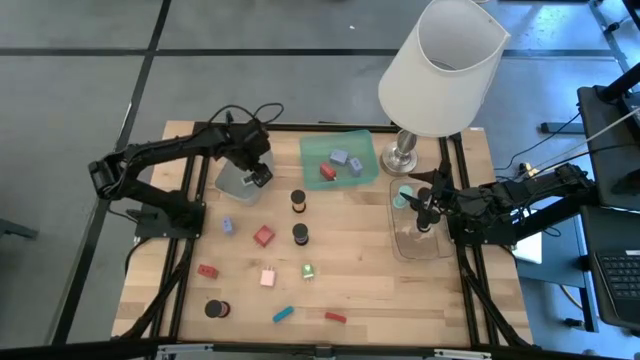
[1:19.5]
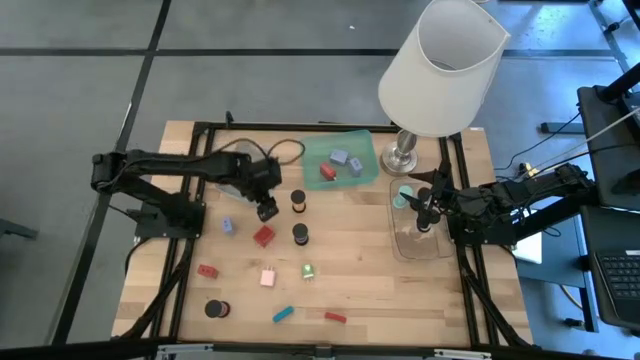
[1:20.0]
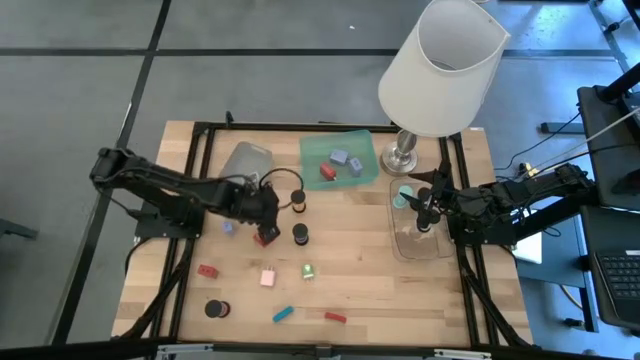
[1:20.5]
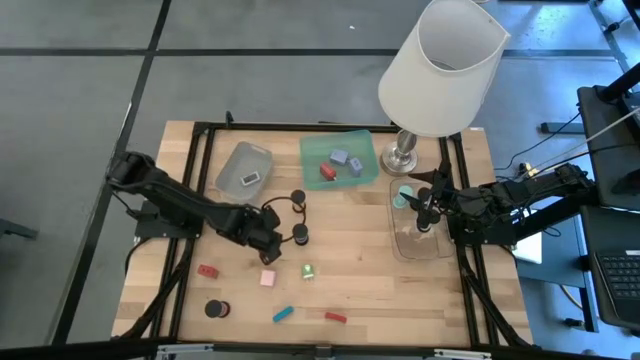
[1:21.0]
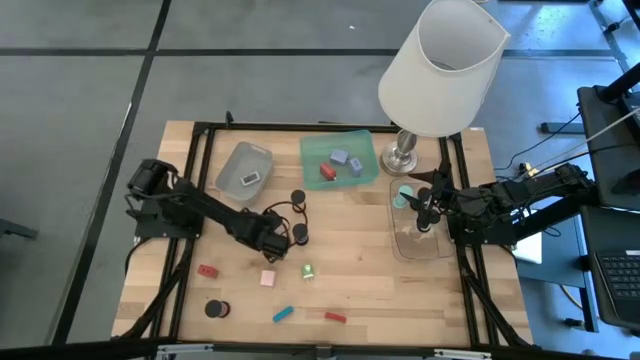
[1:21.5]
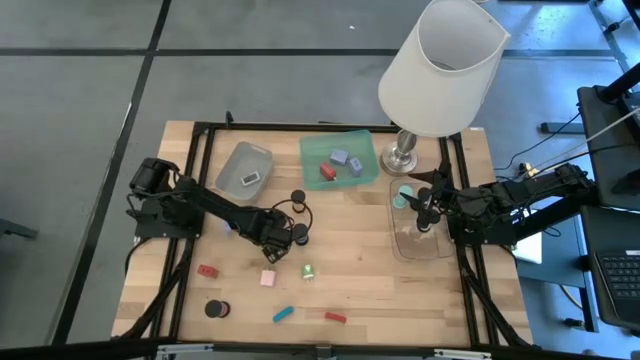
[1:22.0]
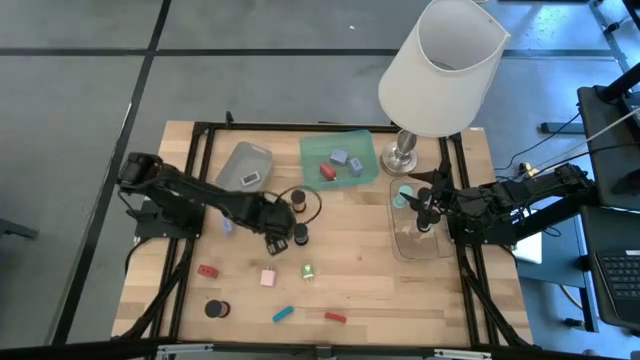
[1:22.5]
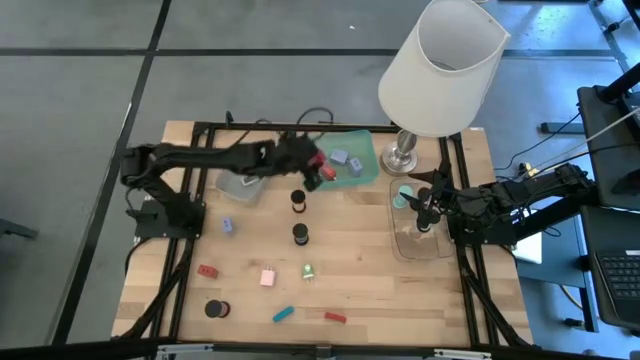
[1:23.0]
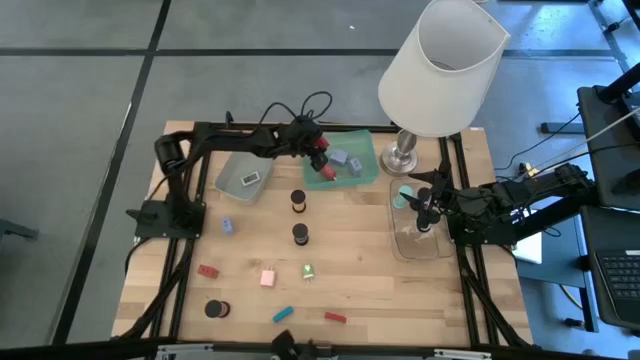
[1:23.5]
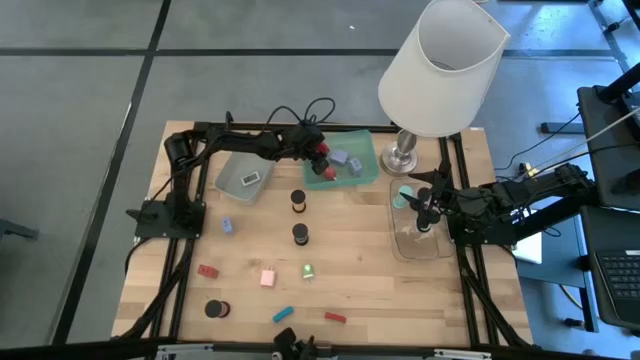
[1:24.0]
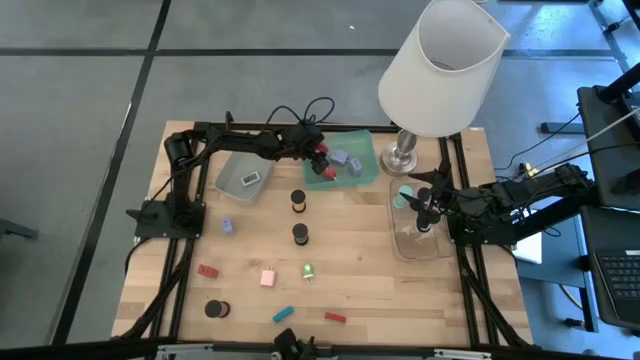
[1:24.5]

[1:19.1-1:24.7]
Task: Pick & Place Office items
Put the right red charger adapter into the green bin

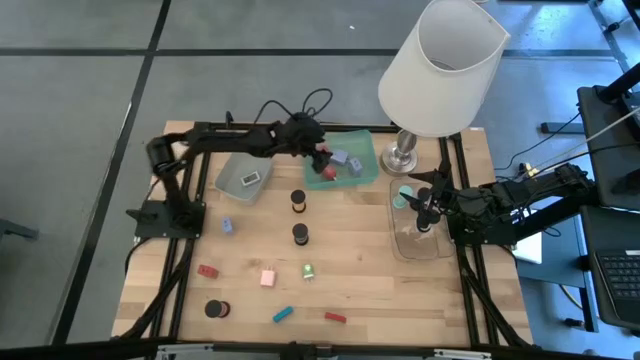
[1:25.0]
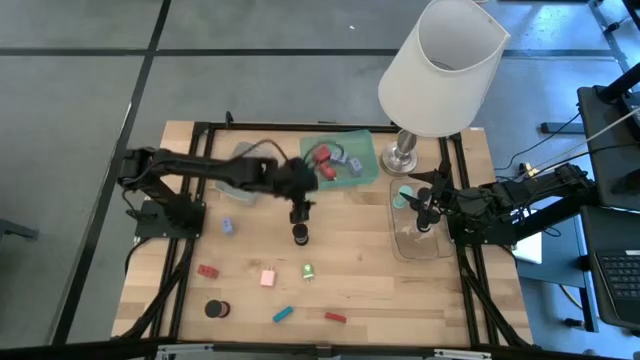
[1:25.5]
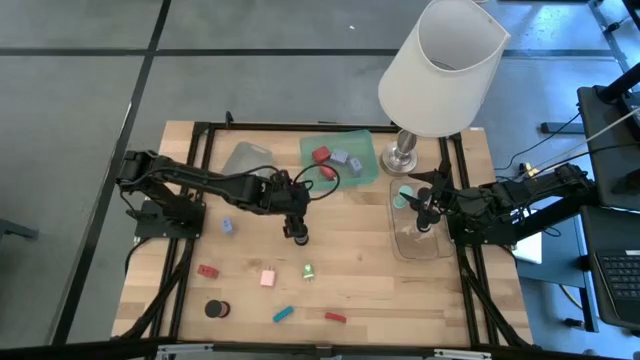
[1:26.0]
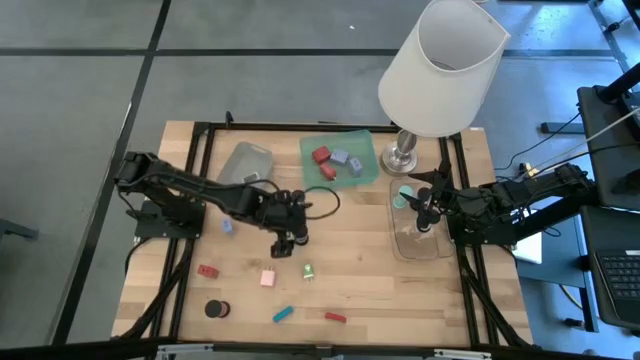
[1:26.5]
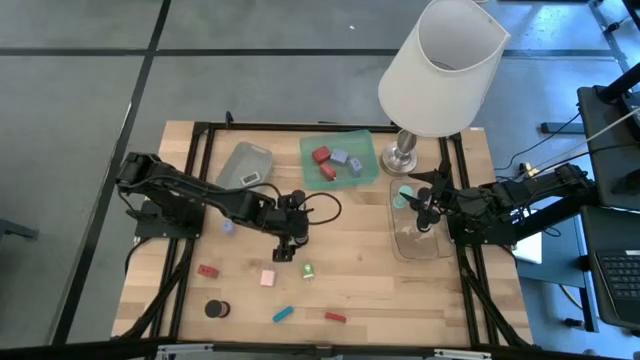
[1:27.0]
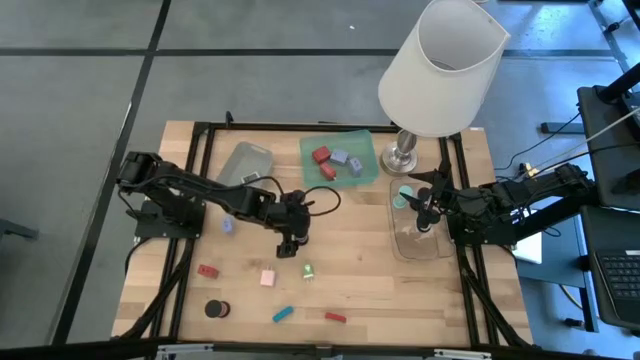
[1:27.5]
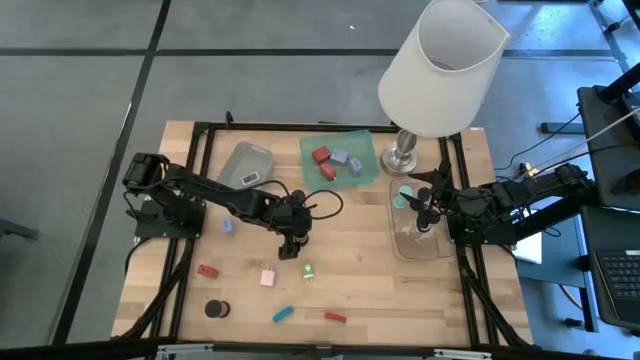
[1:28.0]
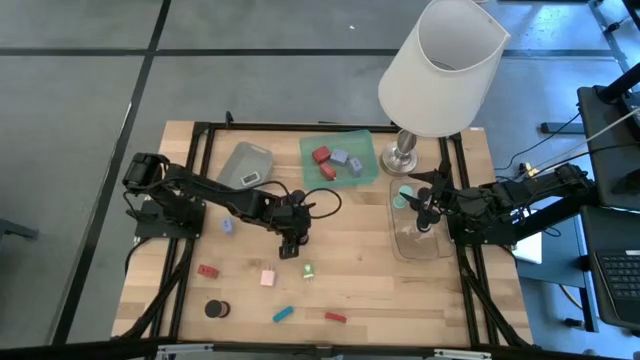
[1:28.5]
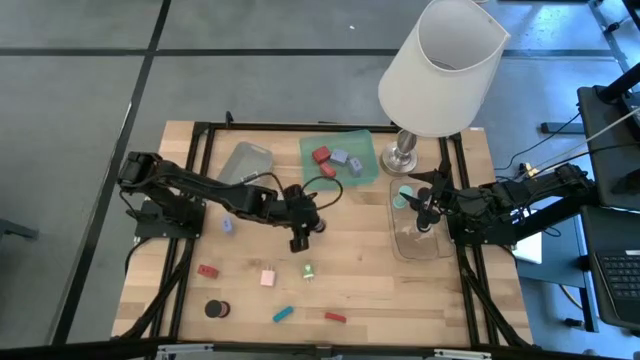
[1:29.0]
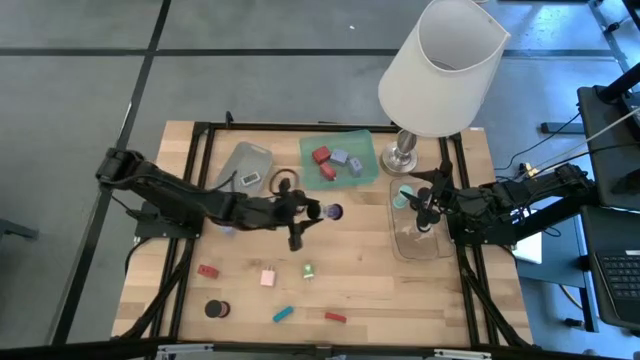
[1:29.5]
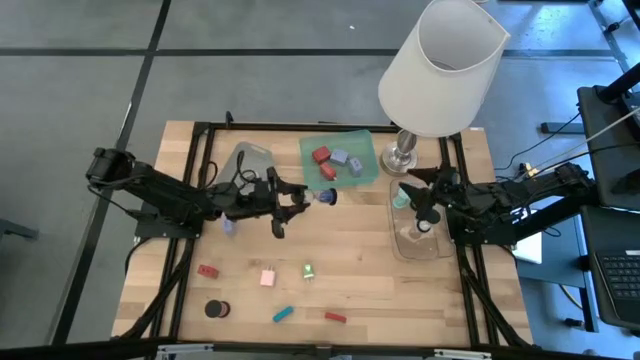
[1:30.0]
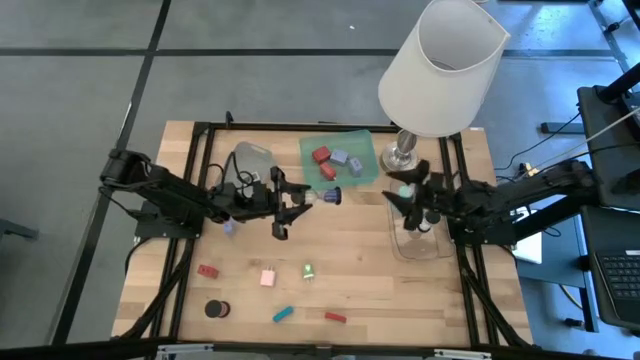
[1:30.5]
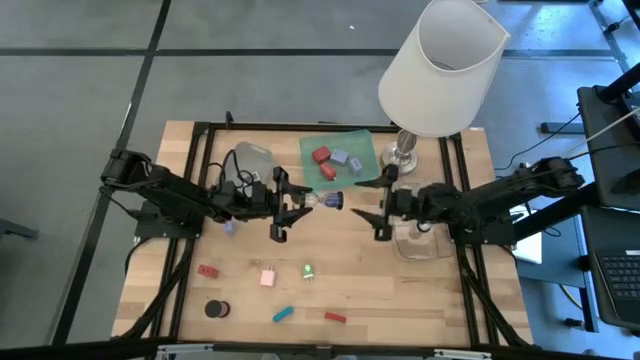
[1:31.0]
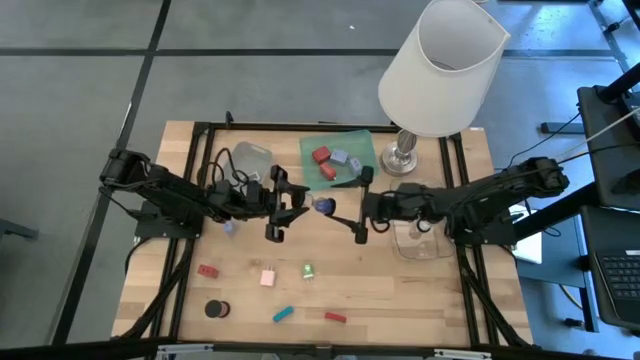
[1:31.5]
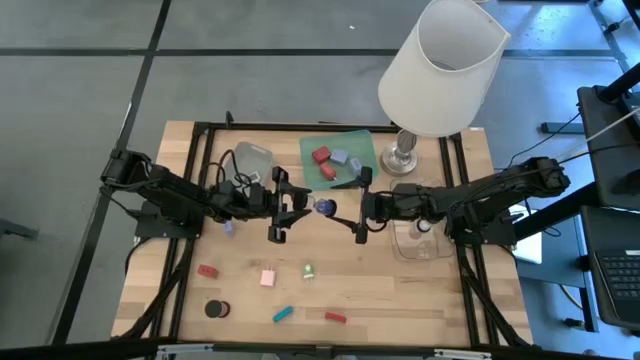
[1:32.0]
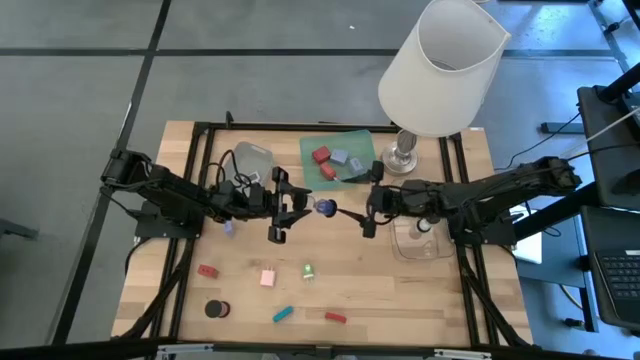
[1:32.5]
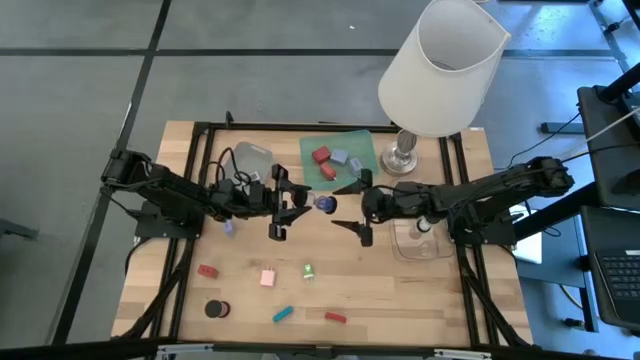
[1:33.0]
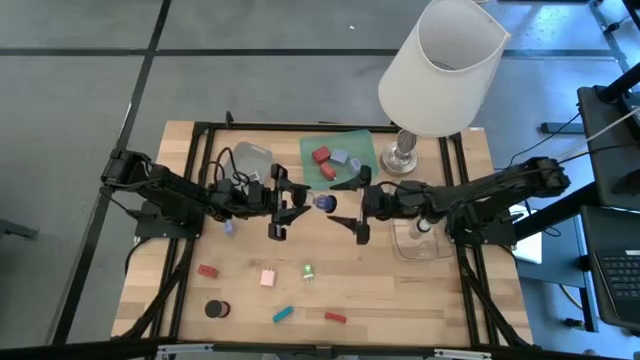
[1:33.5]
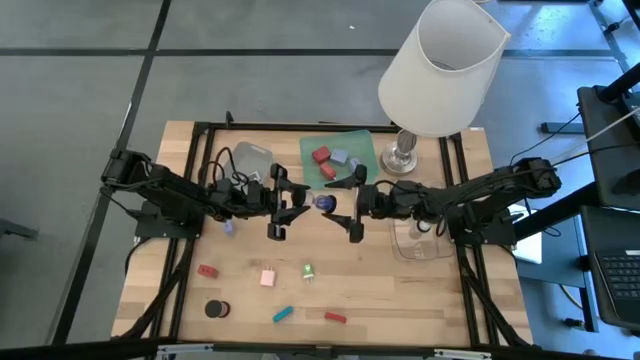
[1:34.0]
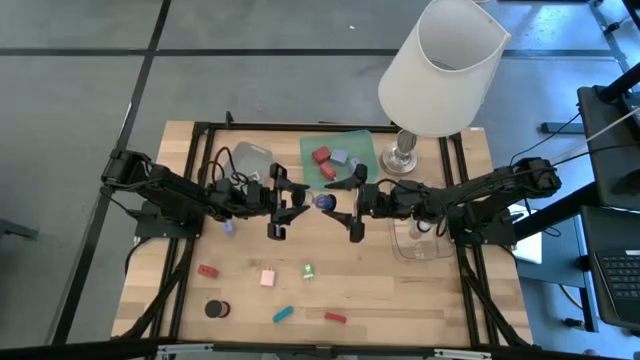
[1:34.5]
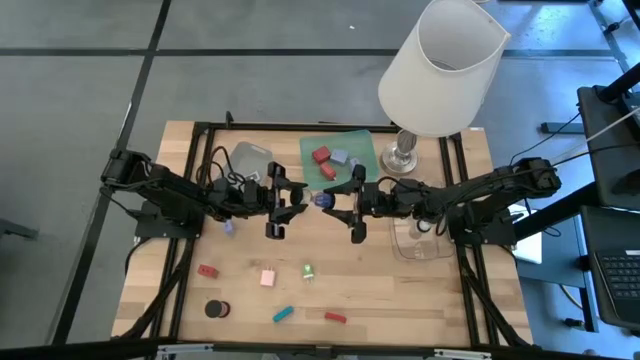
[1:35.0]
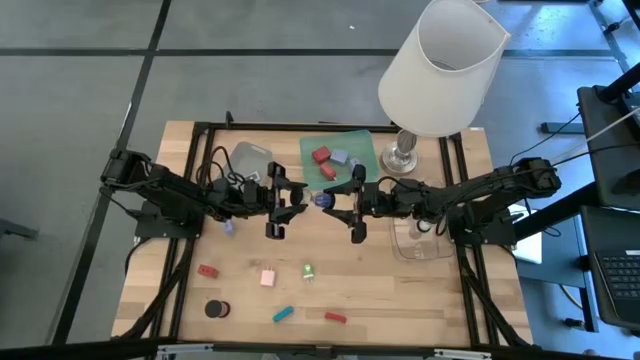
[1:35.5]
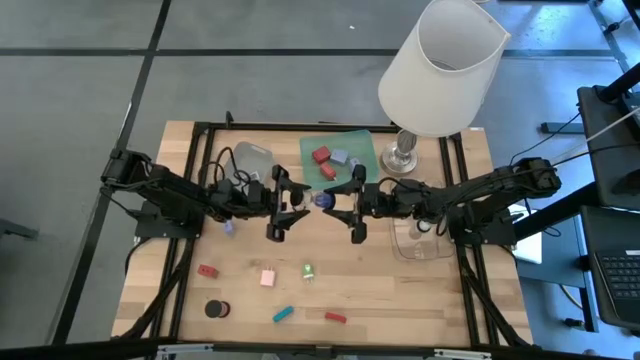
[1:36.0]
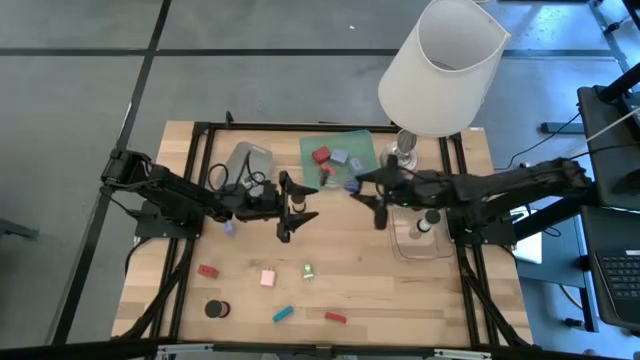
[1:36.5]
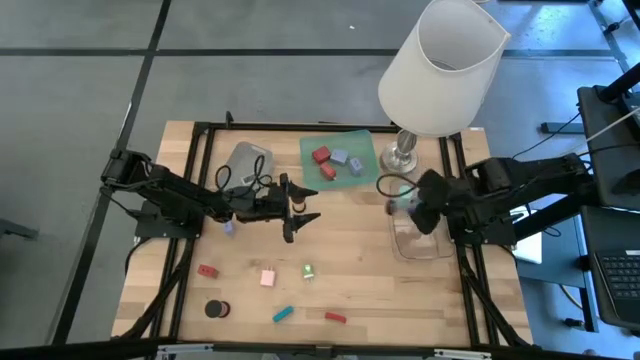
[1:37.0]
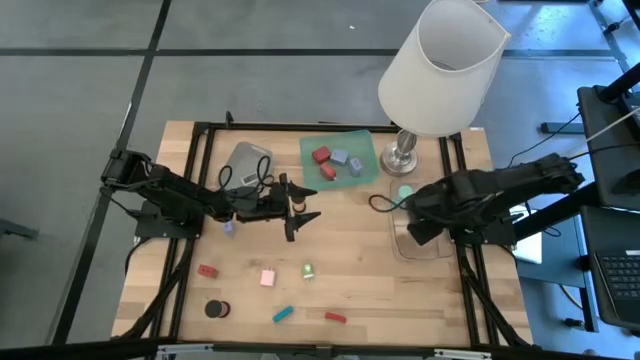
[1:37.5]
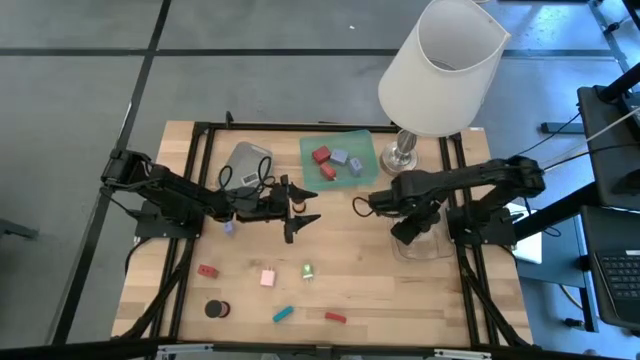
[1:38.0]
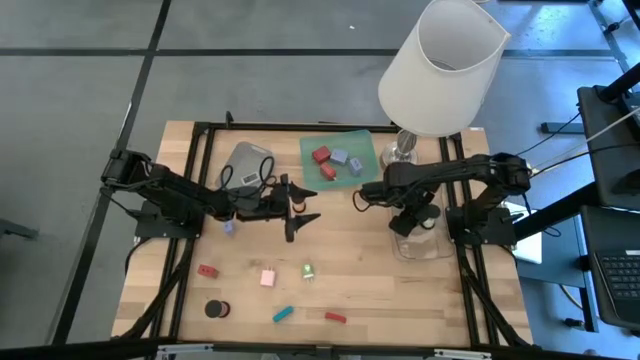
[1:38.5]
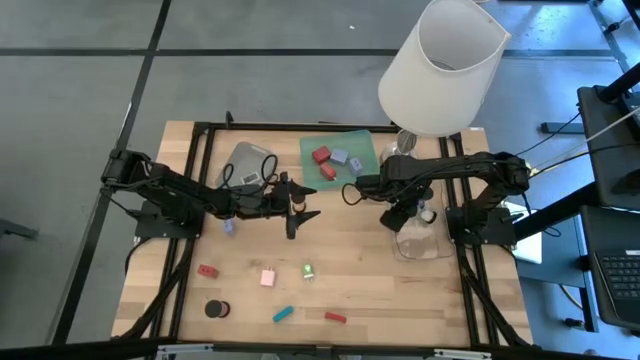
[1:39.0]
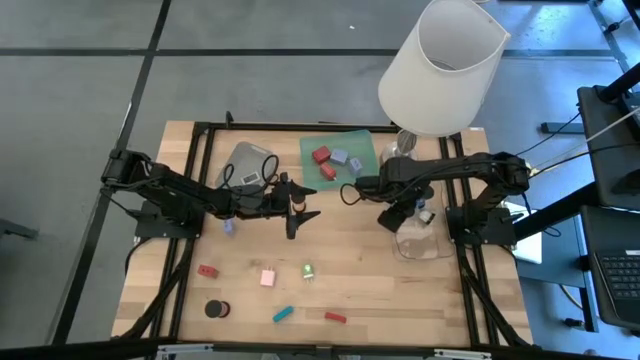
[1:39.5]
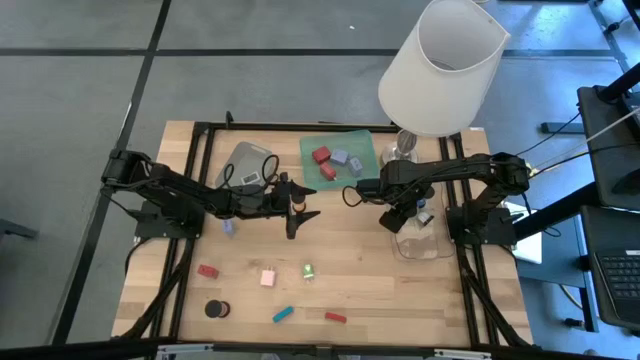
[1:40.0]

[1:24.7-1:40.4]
Put the blue hourglass into the transparent bin
